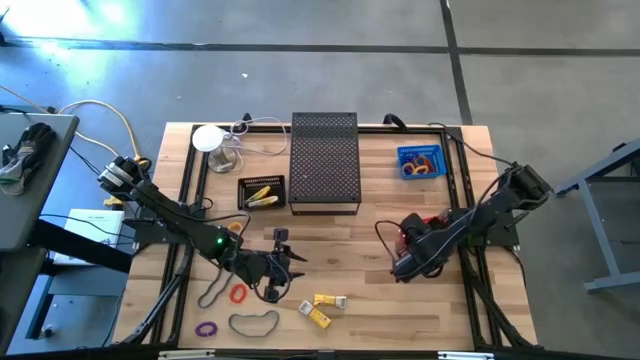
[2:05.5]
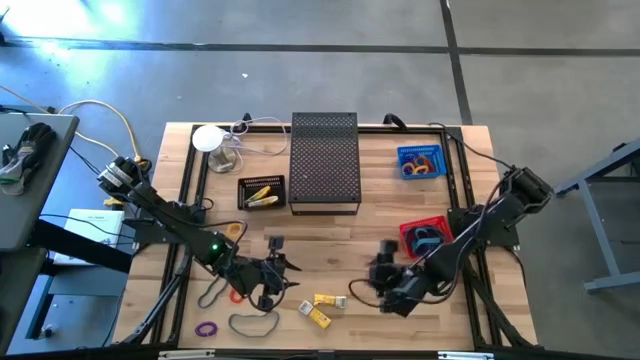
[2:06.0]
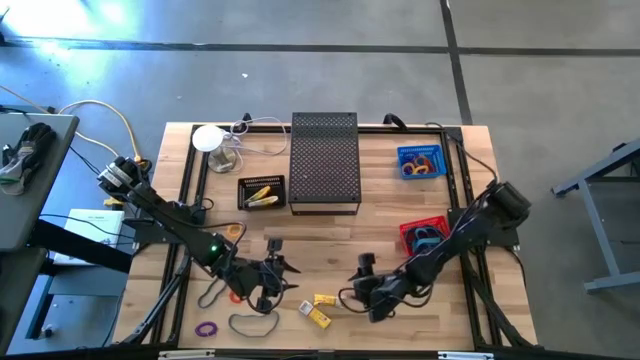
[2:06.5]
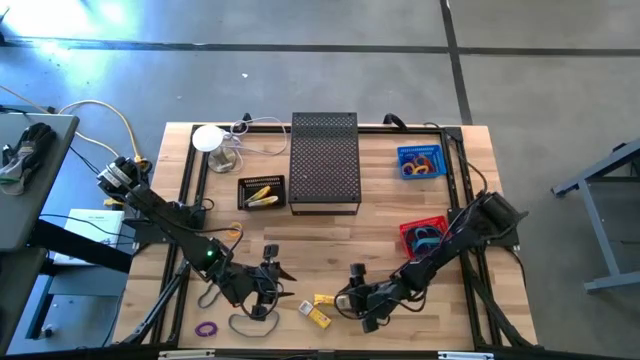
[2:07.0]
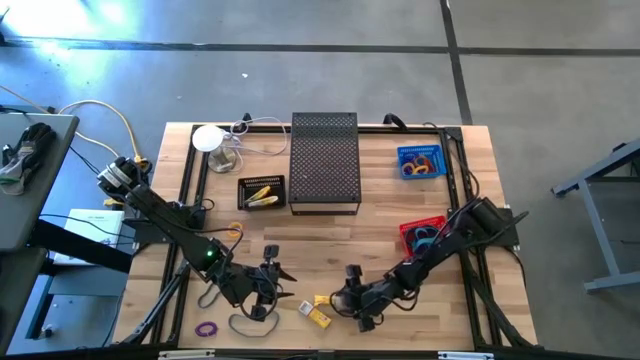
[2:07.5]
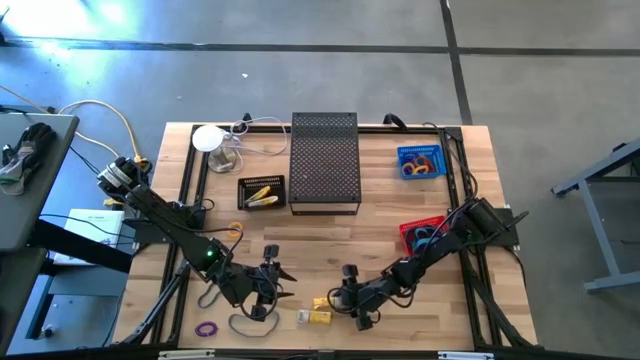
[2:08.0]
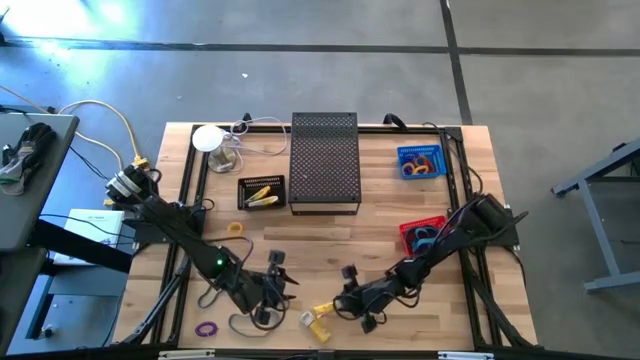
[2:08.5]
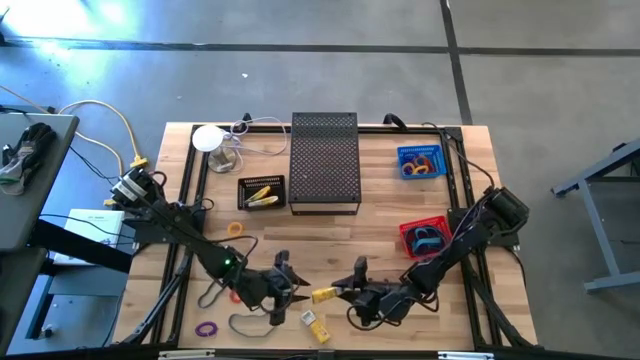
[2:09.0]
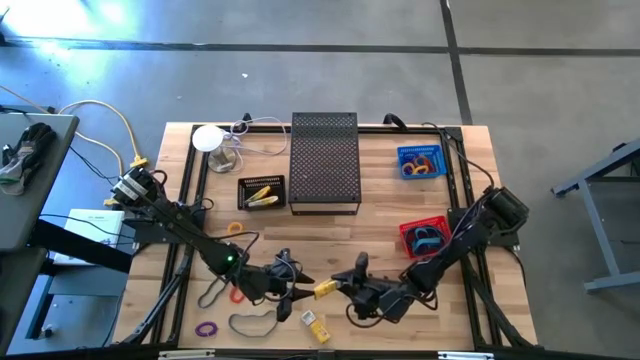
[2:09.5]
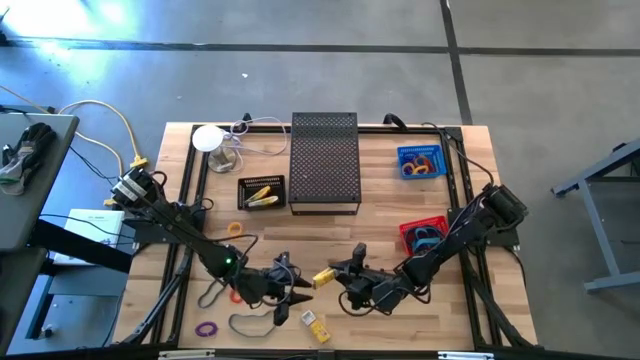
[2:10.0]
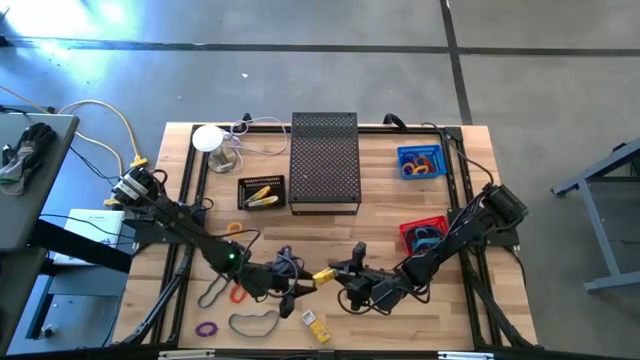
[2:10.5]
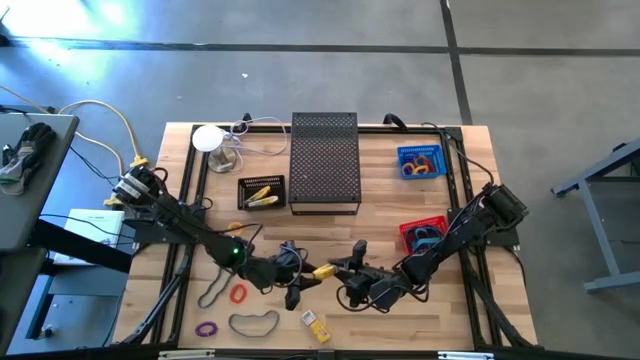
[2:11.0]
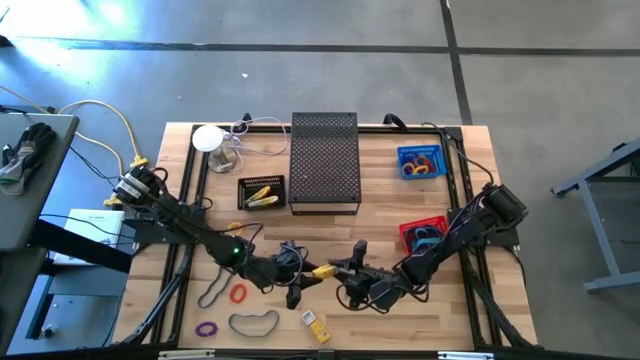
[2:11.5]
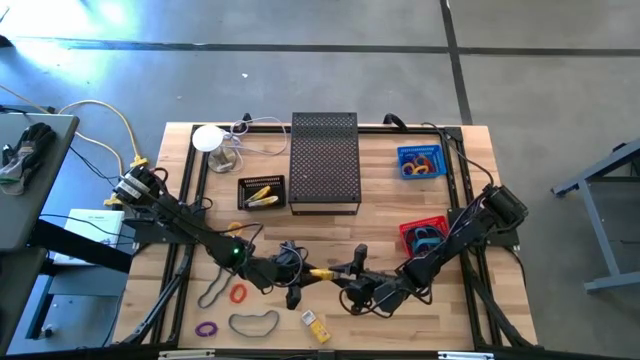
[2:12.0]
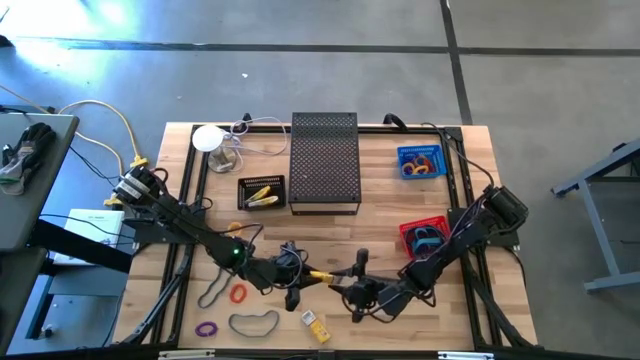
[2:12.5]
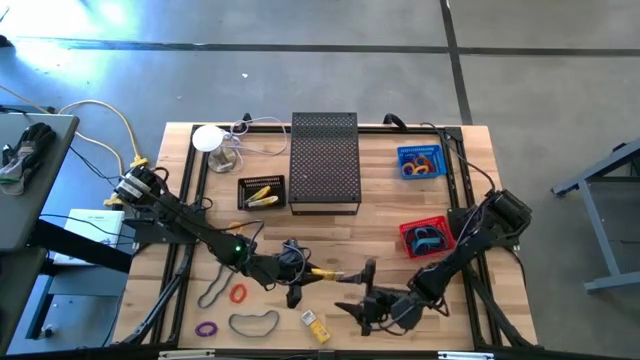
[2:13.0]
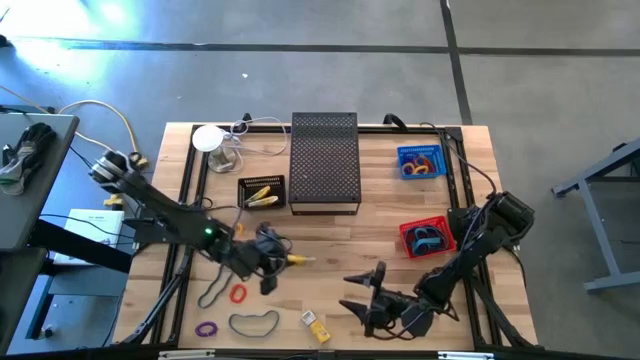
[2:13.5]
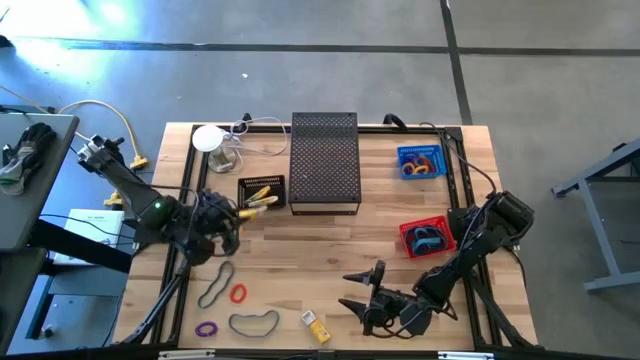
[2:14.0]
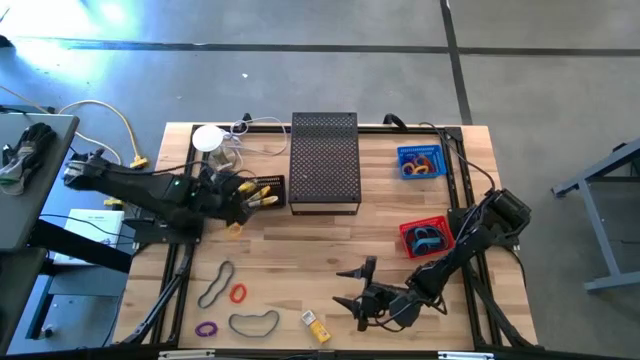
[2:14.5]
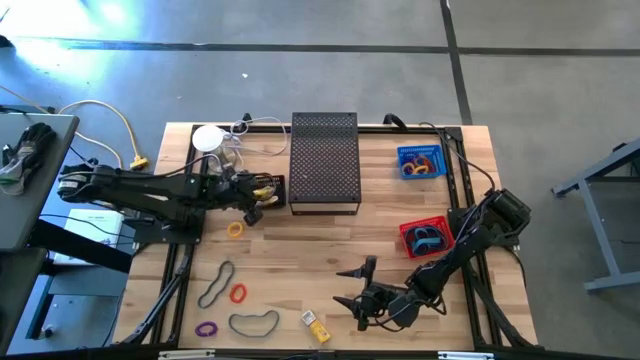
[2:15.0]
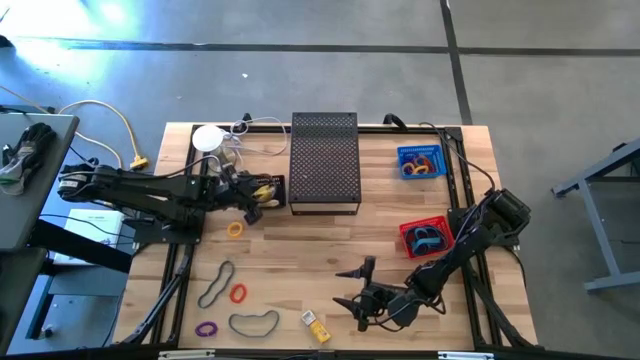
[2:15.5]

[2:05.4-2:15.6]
Task: Pick & Place Office Desk Supplies
Put the yellow crayon box into the black bin

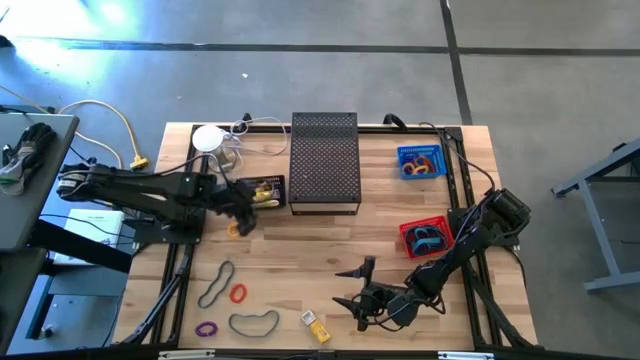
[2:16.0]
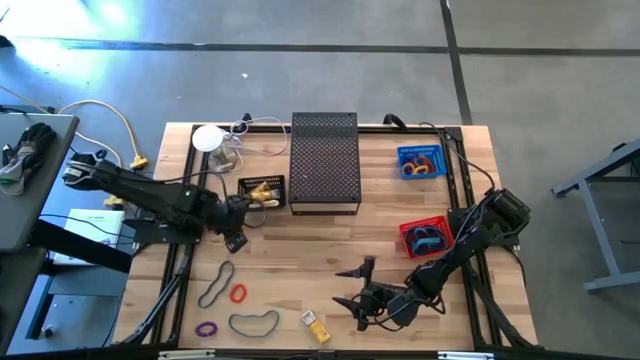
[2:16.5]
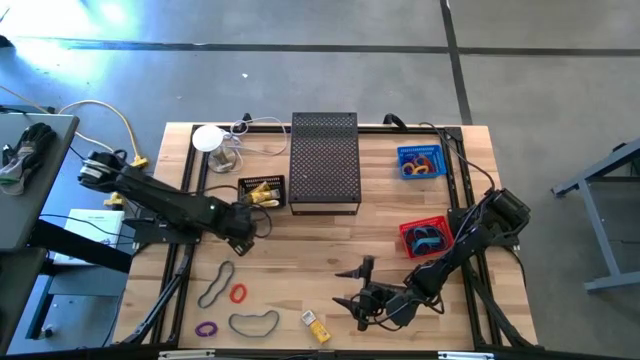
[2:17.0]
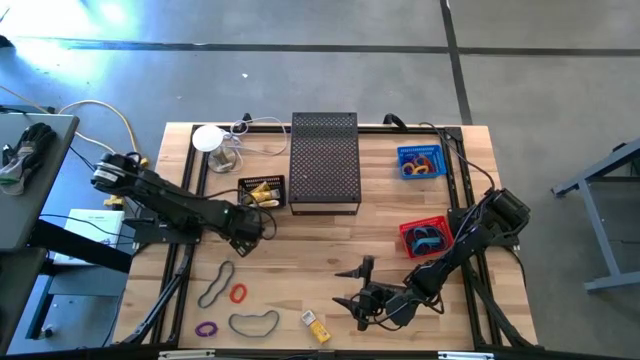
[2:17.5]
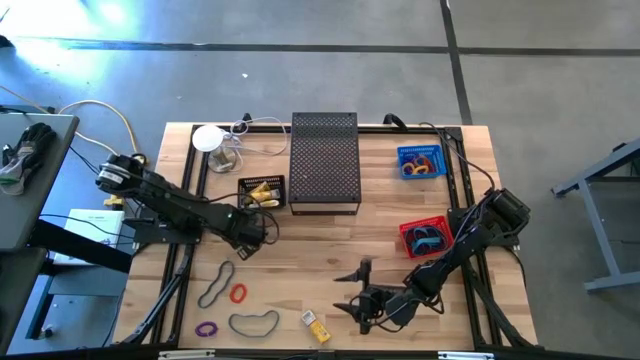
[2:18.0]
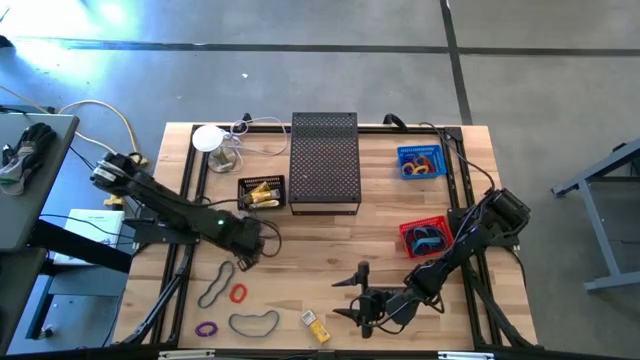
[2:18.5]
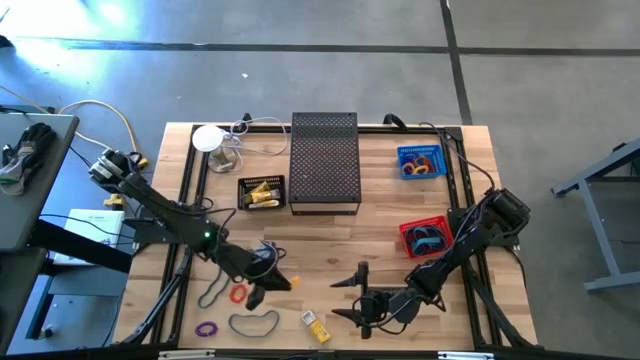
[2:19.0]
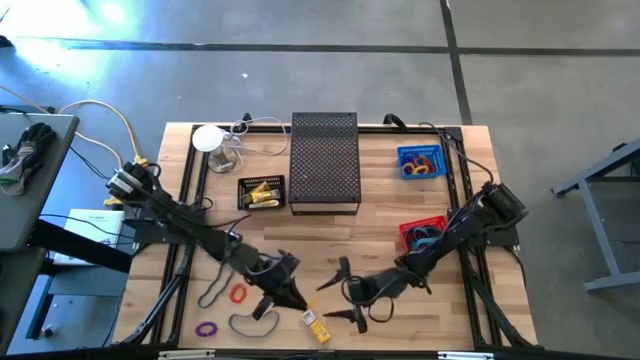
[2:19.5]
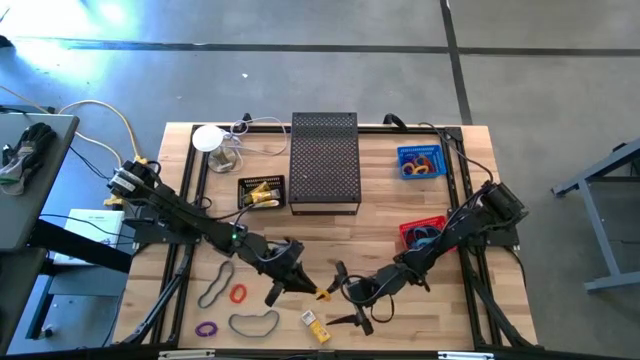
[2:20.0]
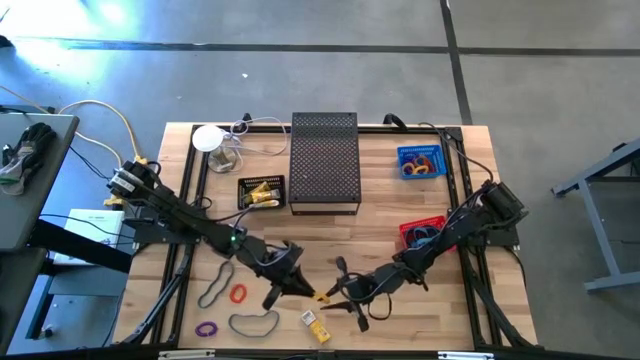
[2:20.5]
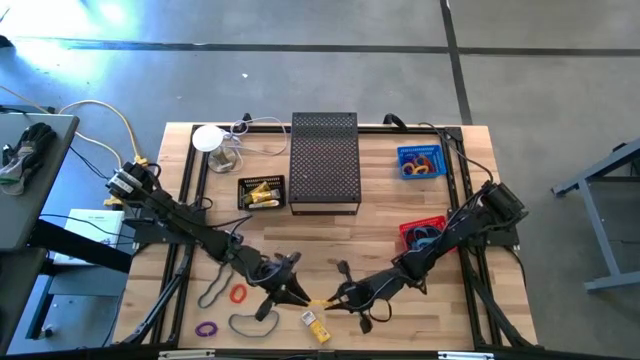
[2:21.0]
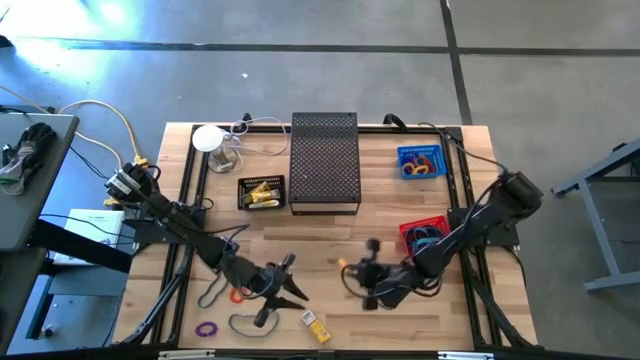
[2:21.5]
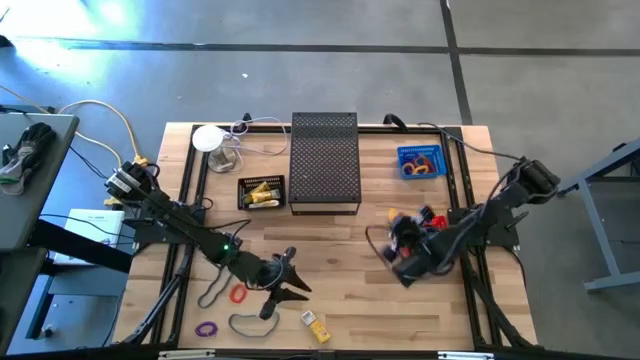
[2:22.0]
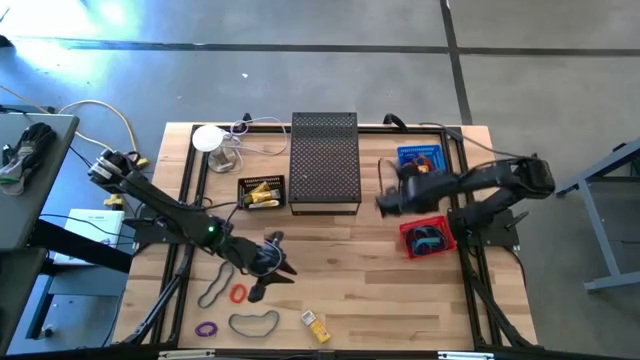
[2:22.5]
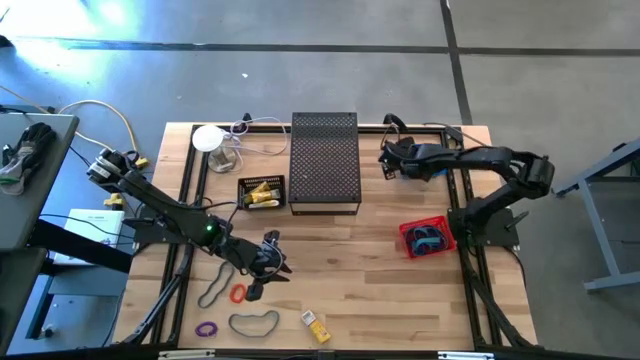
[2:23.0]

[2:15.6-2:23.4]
Put the yellow spring keychain into the blue bin

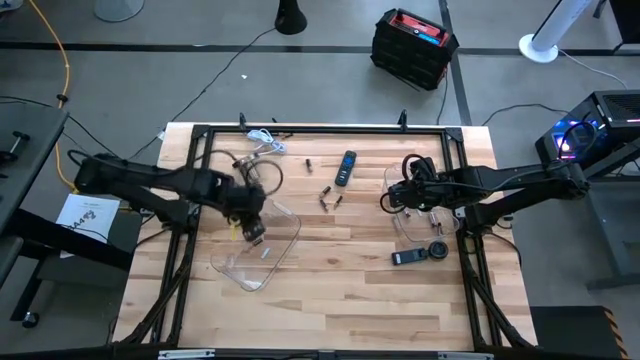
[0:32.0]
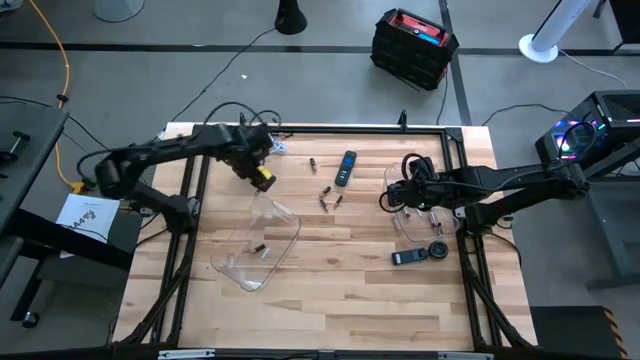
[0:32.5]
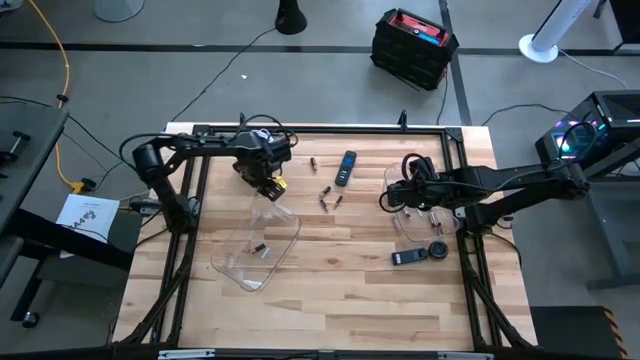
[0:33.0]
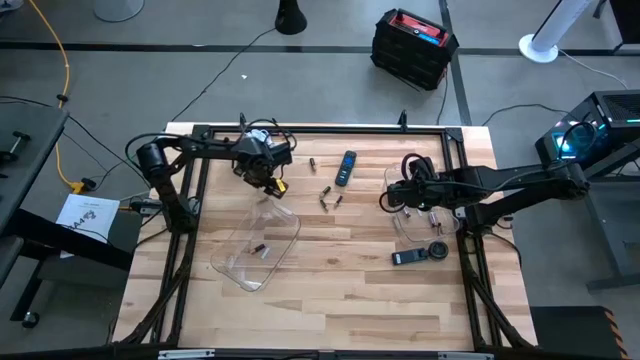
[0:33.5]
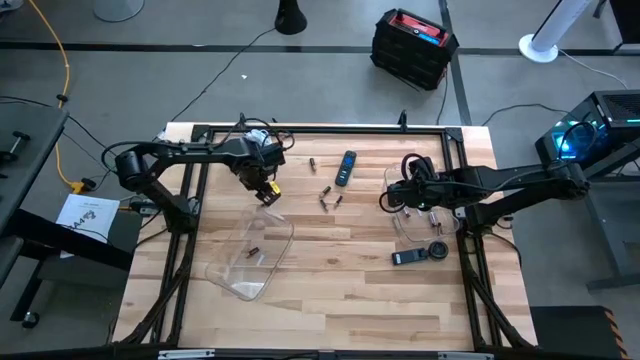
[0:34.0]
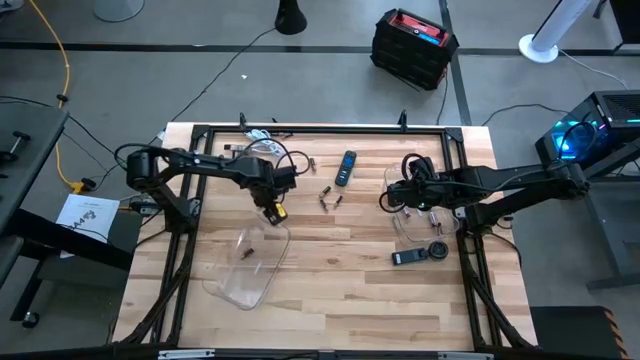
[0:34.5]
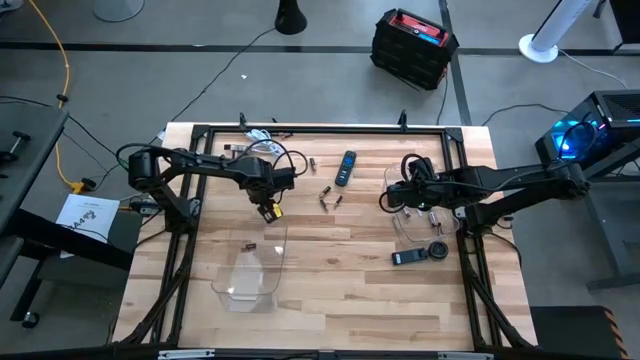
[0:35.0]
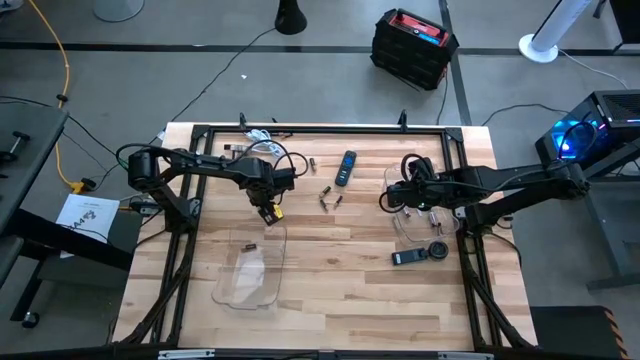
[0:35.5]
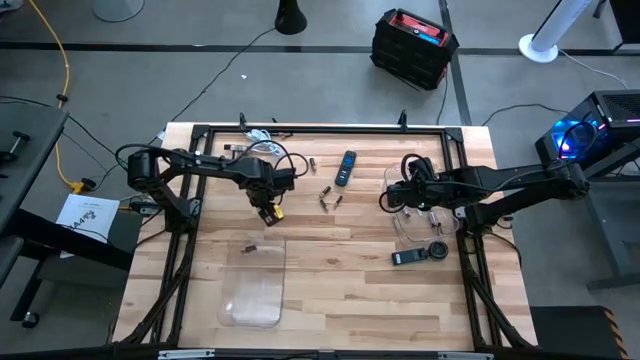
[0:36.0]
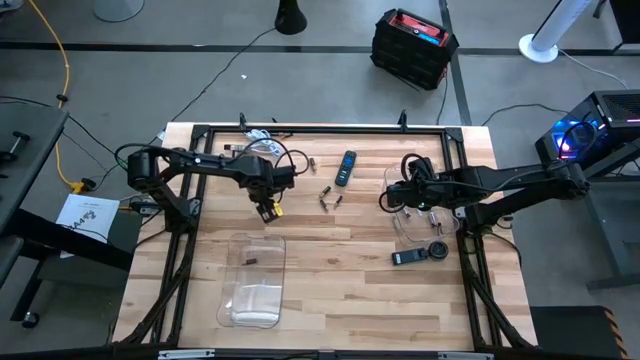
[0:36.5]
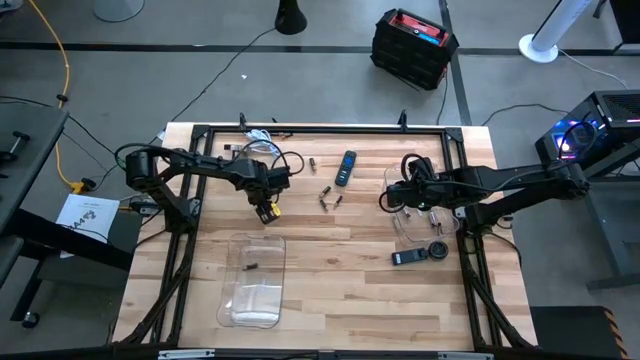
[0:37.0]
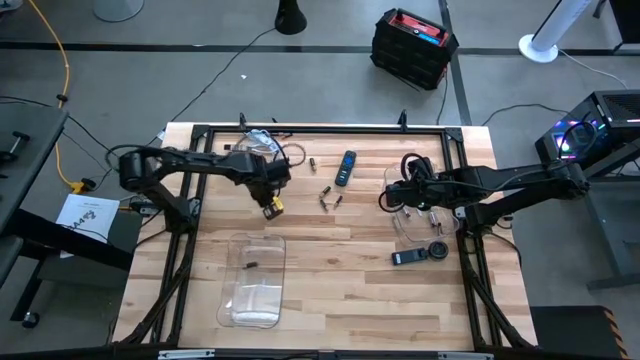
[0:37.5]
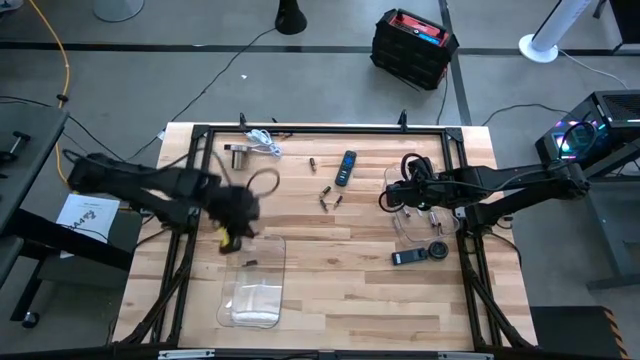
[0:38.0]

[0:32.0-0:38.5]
Task: Sort batteries
Put the black battery into the left transparent bin
